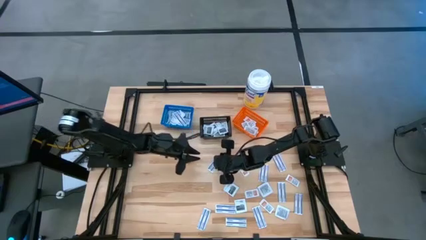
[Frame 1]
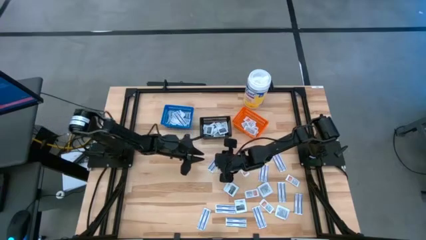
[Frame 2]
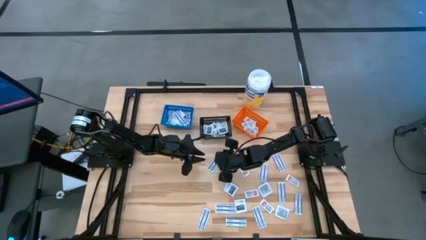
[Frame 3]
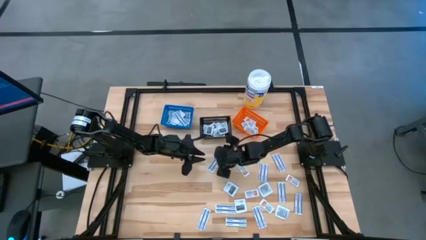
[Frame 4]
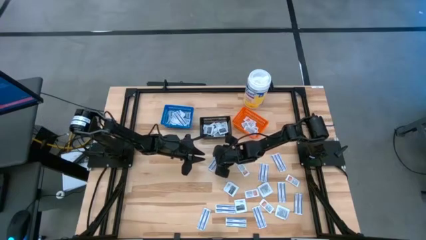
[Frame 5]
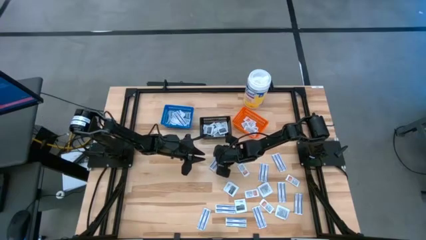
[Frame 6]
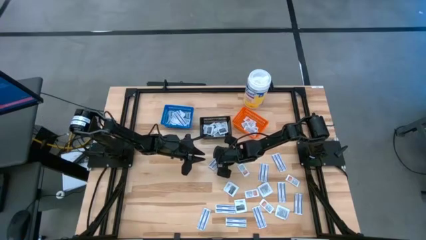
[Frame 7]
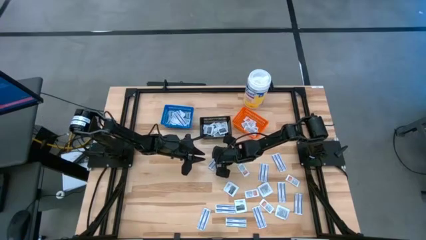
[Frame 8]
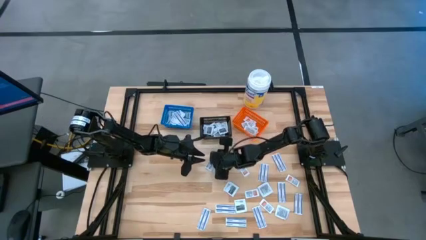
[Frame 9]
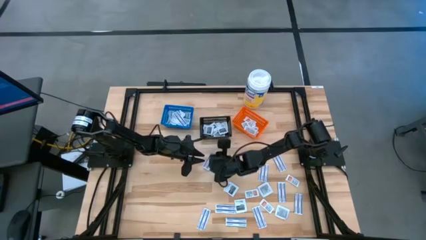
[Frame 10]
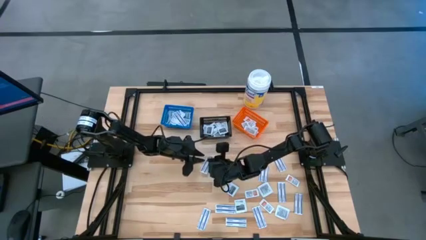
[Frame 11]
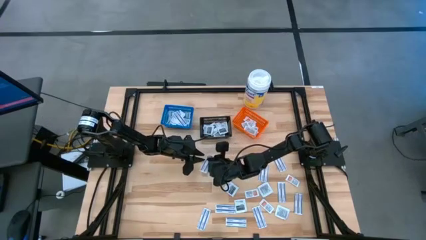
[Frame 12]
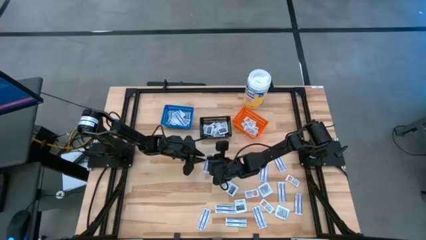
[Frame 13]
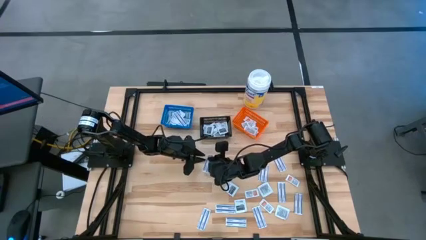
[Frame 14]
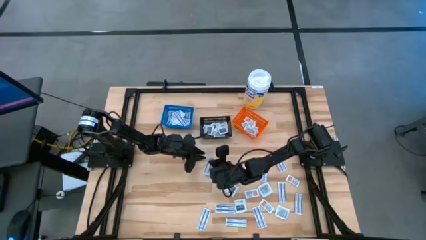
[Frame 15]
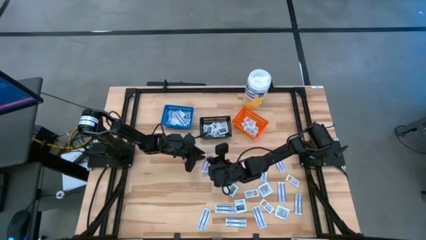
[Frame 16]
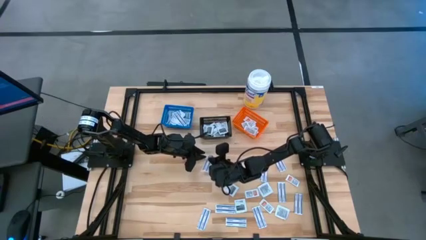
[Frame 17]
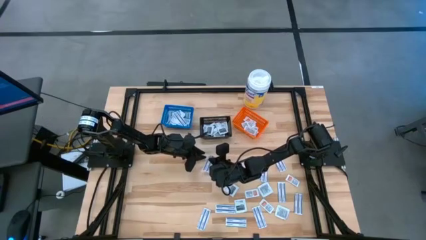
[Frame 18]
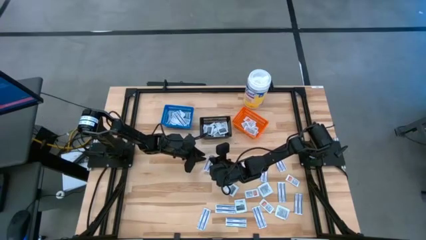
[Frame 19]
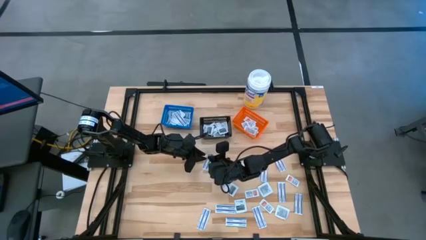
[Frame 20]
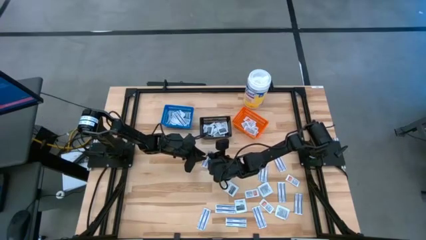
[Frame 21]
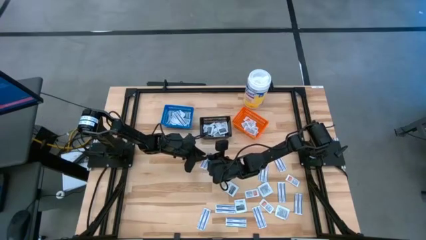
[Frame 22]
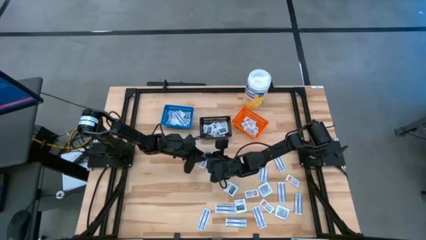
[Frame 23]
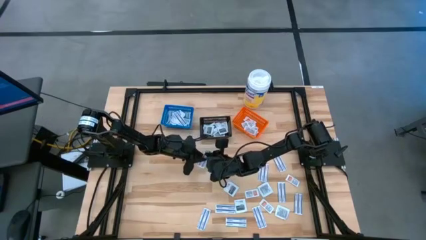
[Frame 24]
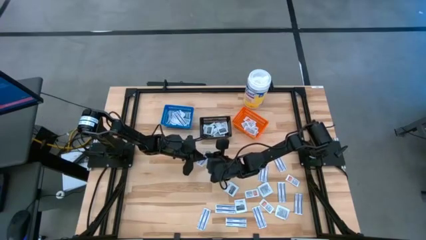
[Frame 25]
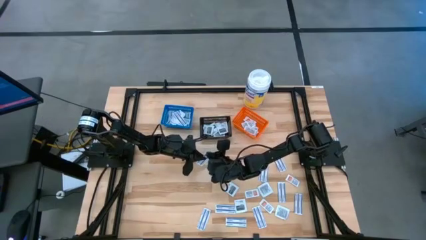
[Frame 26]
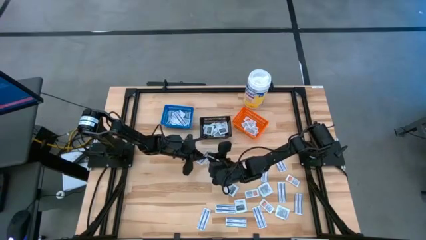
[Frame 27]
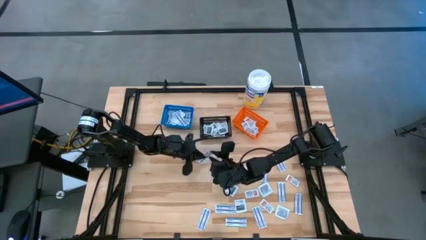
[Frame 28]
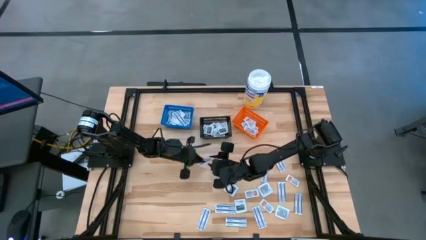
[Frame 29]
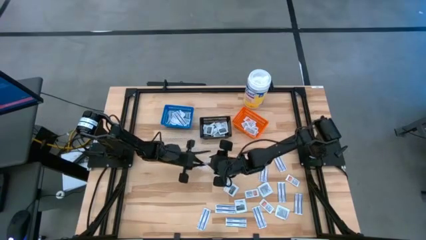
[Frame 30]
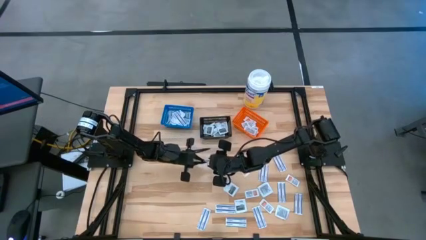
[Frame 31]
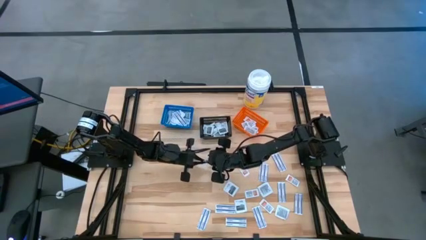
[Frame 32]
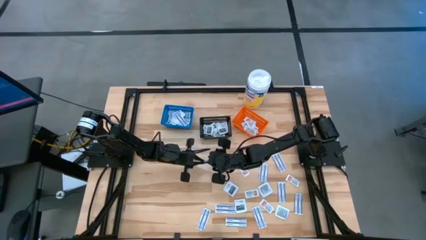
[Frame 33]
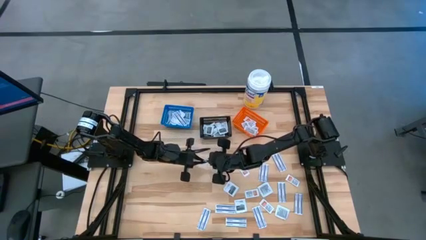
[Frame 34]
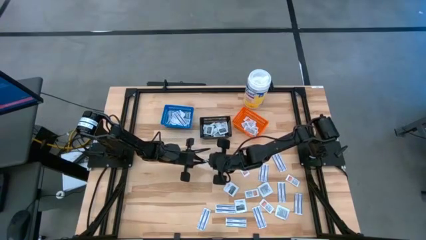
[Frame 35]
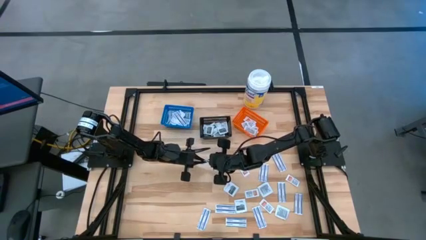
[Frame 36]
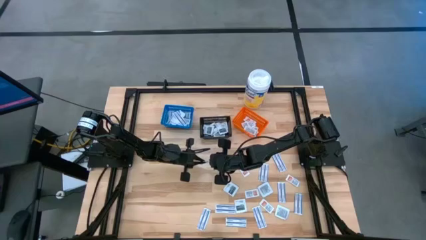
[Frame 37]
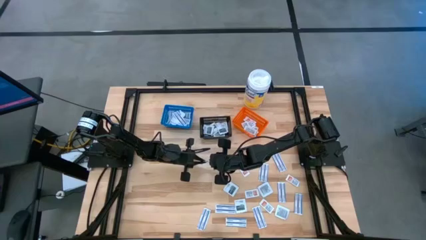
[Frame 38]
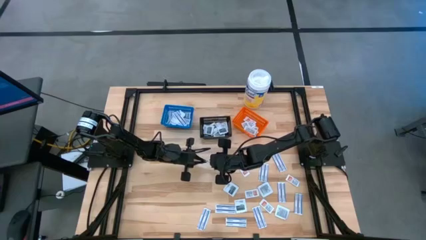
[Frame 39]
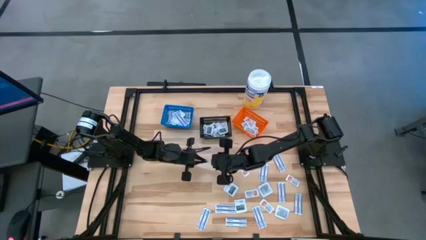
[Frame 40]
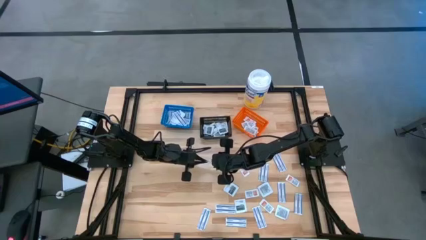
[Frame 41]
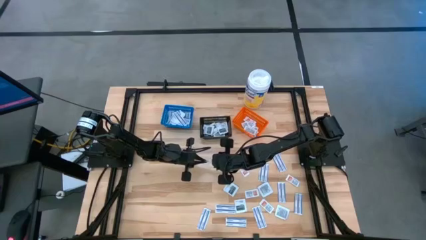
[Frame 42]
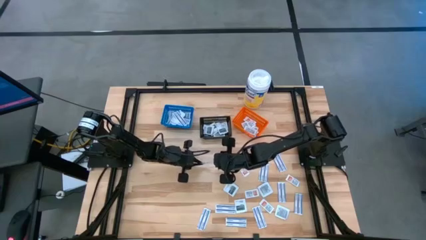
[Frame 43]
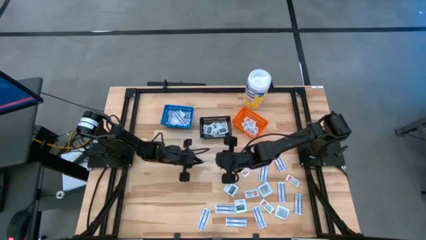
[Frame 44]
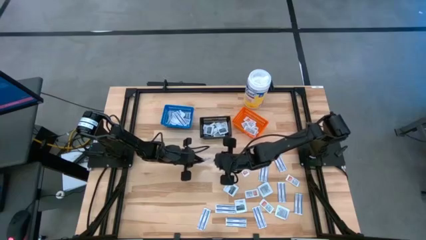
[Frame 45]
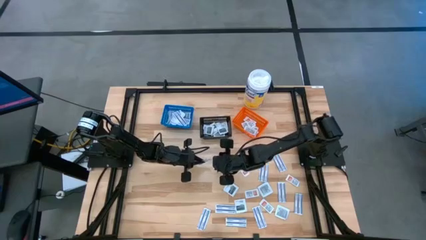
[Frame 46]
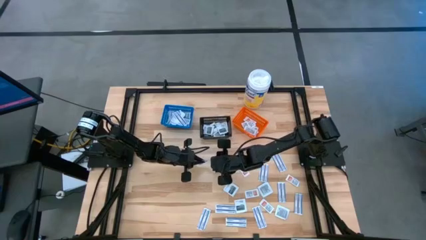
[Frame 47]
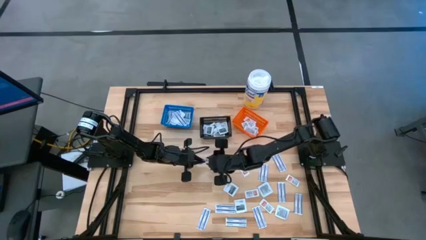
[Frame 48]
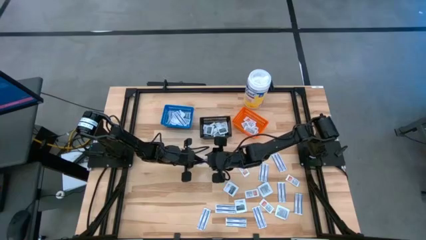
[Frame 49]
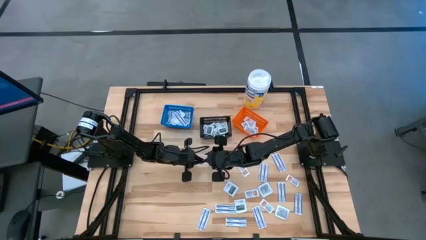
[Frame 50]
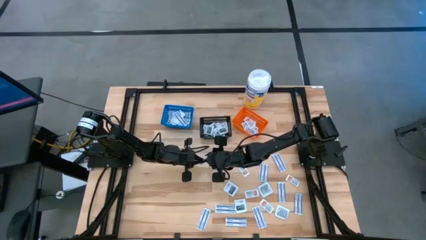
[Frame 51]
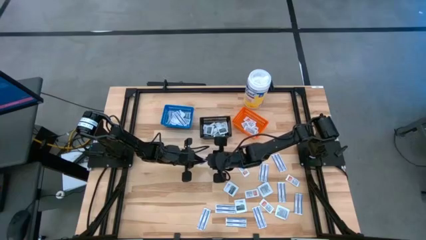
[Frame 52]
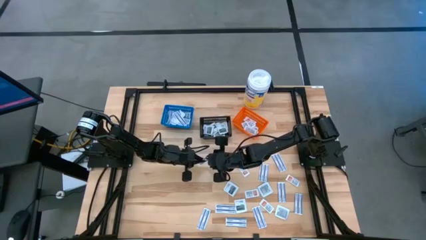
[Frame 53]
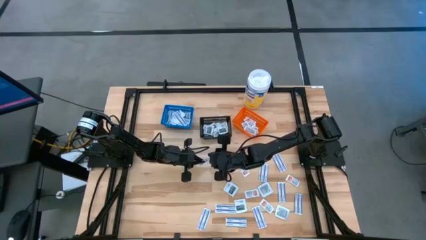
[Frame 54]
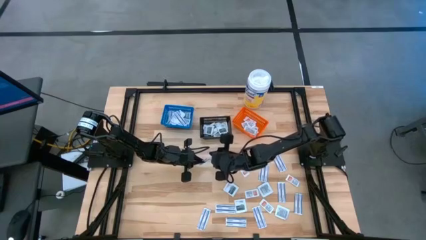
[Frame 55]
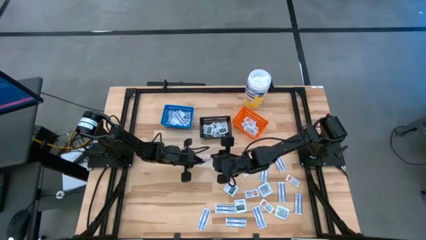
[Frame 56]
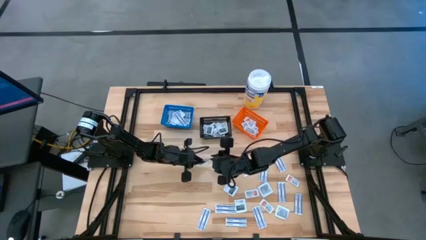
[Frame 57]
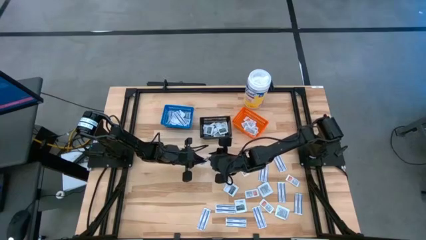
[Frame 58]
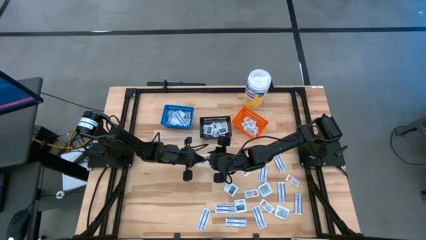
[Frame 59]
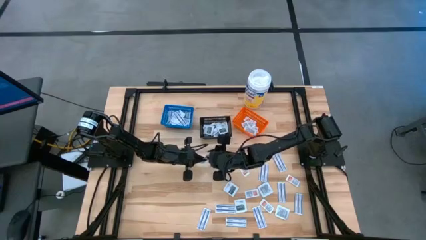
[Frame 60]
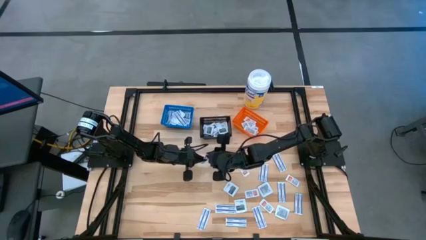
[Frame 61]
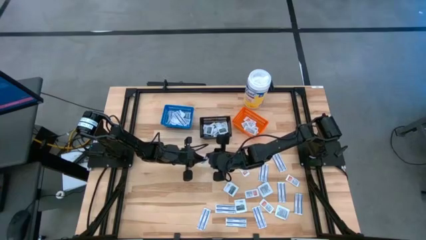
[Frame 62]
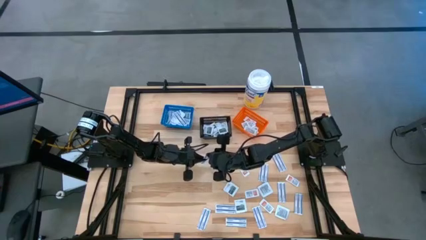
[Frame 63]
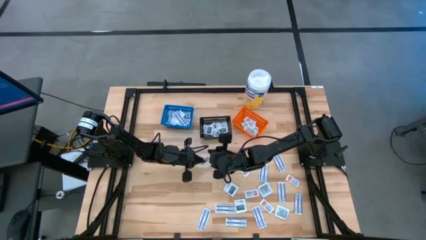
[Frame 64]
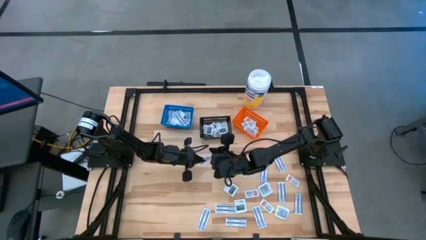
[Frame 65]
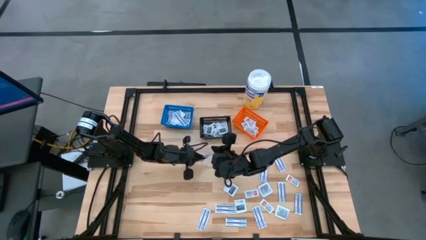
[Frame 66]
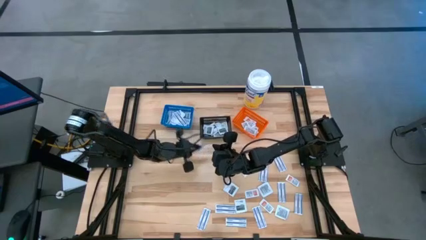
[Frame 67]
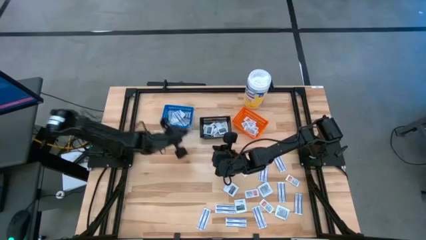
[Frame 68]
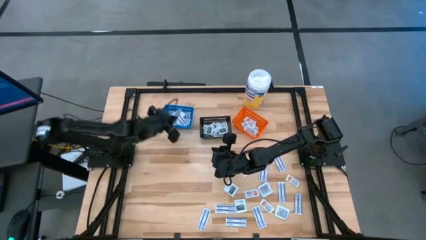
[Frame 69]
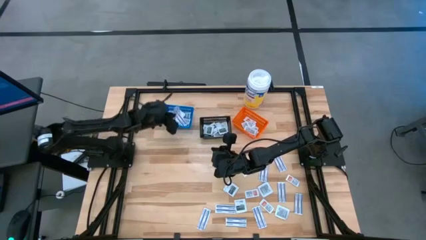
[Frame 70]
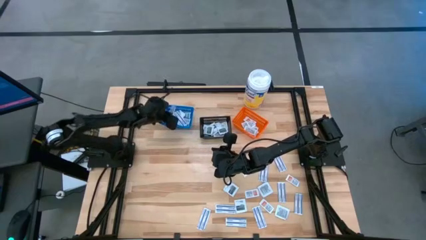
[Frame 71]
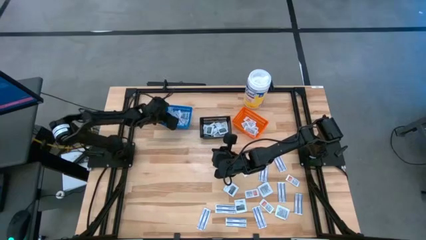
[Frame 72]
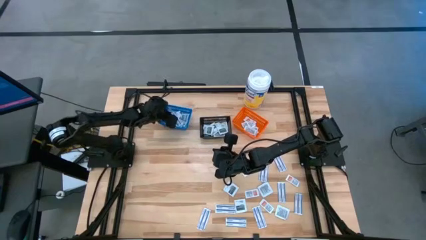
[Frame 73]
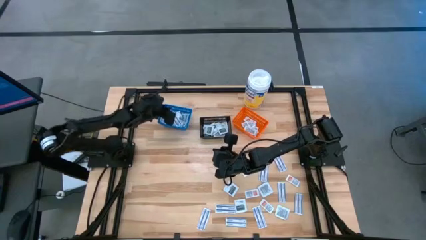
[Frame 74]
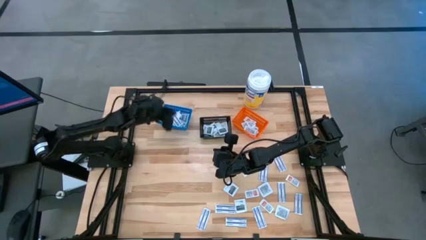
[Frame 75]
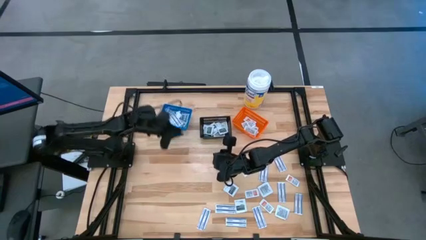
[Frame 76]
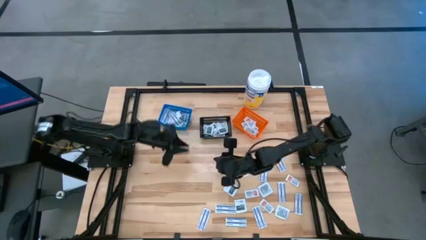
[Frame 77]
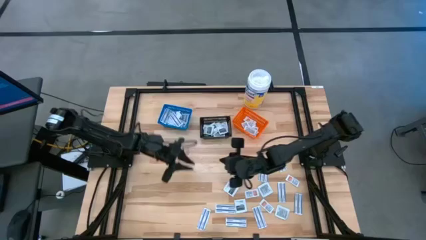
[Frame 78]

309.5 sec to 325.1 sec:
Task: Pick & Place First Aid Supplies
Put the bandage into the blue container

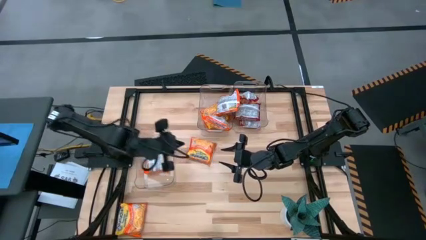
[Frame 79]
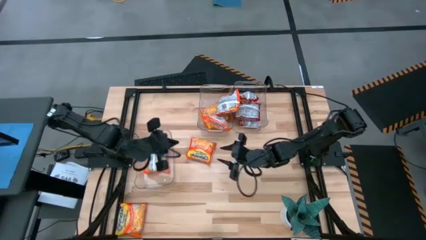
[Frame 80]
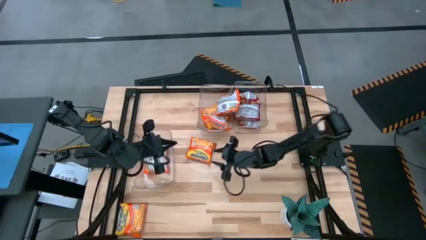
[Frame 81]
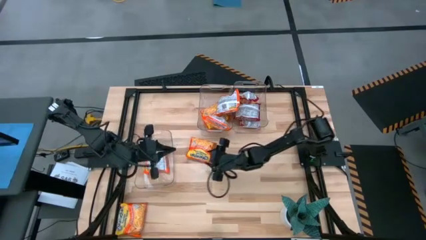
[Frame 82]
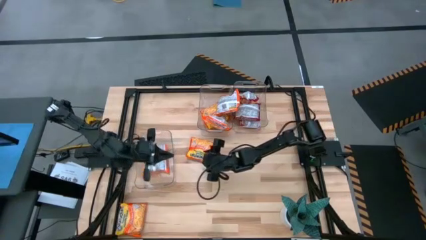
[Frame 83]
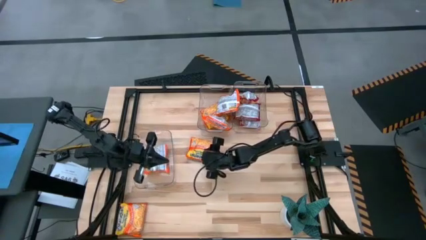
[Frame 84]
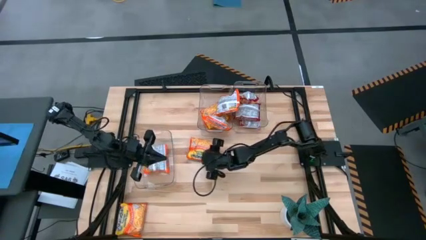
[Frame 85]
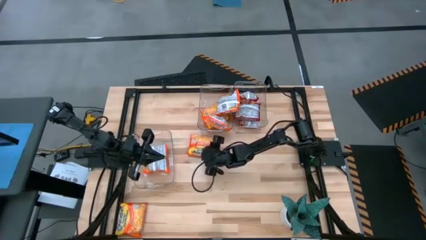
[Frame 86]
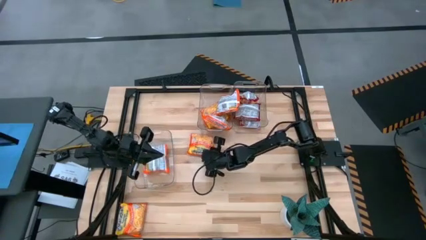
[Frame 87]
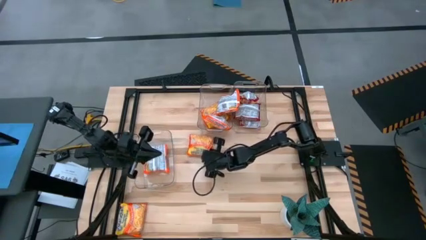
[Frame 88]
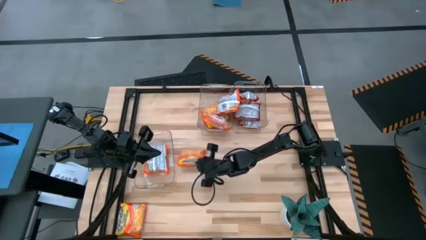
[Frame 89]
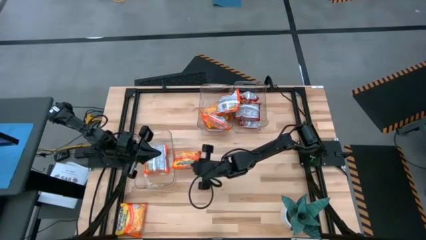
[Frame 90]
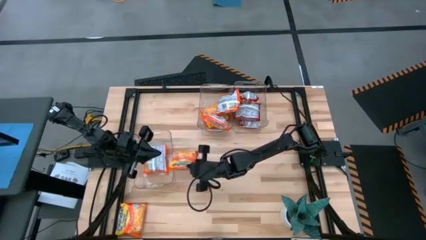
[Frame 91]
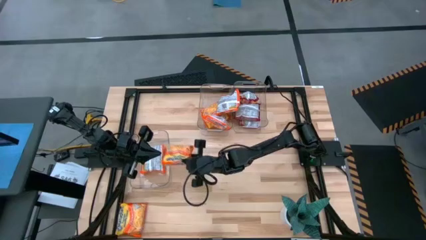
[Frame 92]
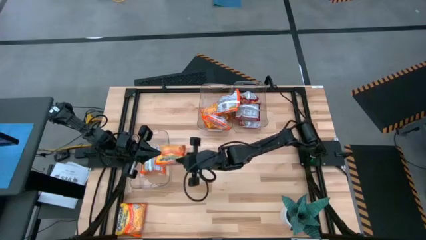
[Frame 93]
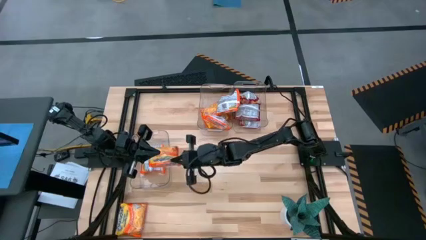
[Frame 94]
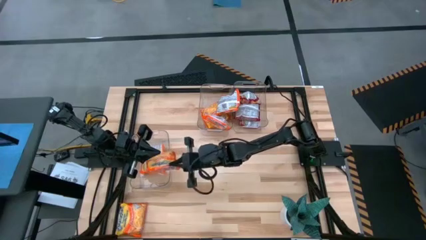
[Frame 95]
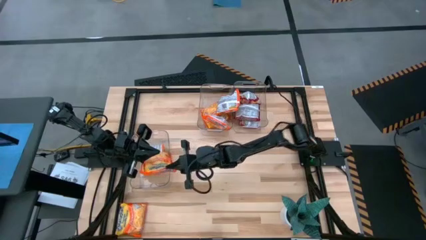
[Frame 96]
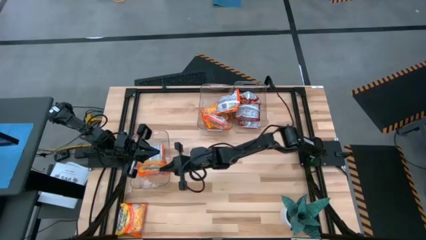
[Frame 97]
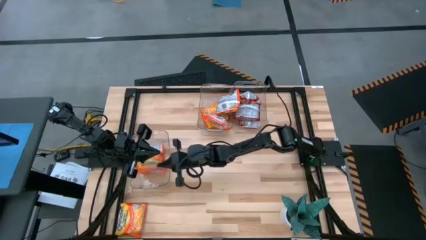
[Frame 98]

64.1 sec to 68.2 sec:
Task: Sort Maruchan noodles
Put the orange noodle pack into the bottom left transparent bin
